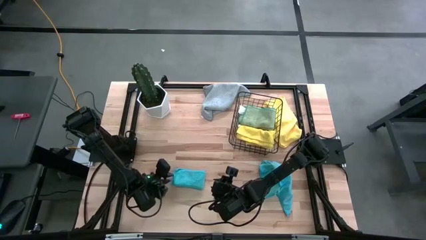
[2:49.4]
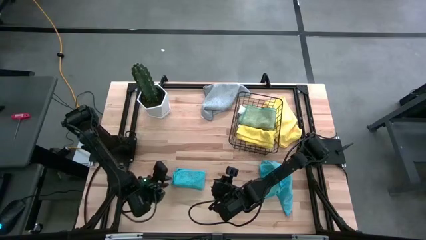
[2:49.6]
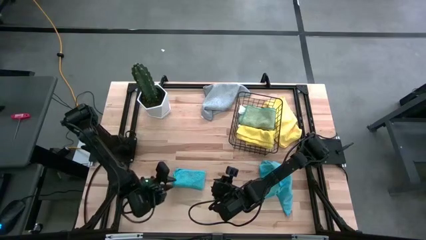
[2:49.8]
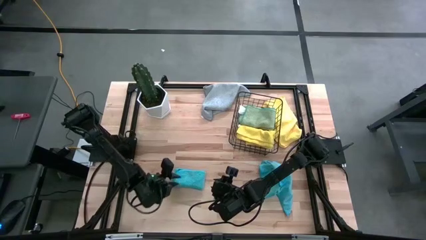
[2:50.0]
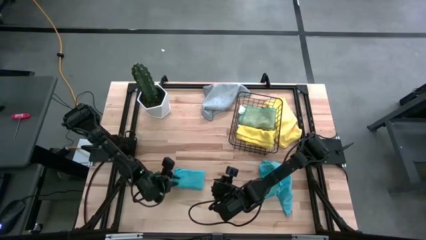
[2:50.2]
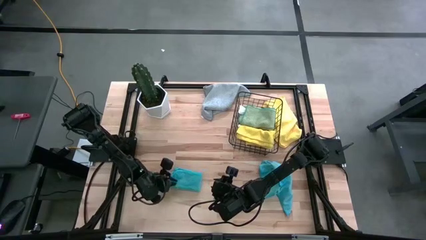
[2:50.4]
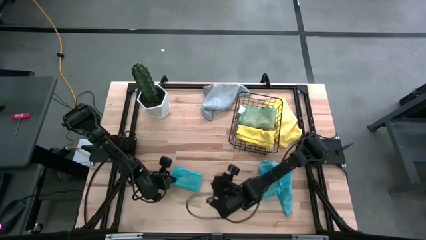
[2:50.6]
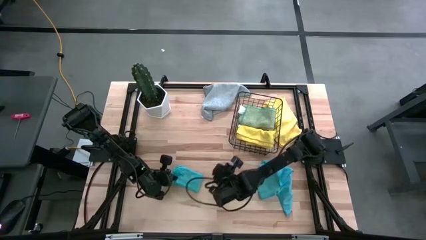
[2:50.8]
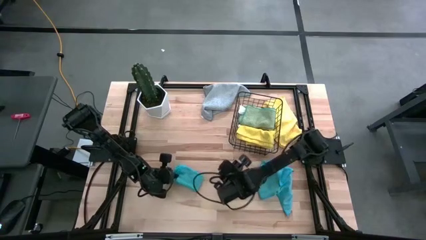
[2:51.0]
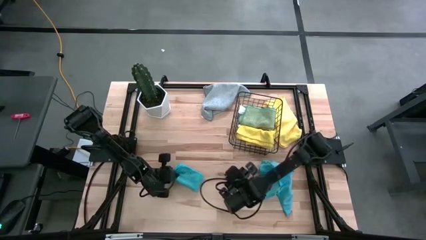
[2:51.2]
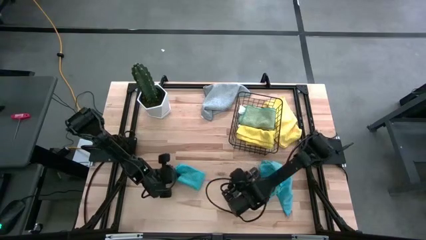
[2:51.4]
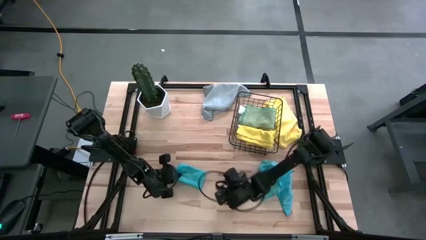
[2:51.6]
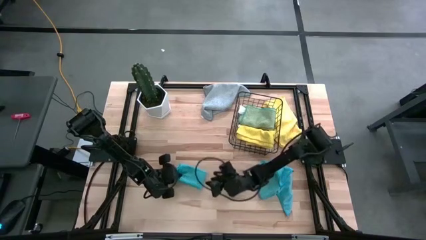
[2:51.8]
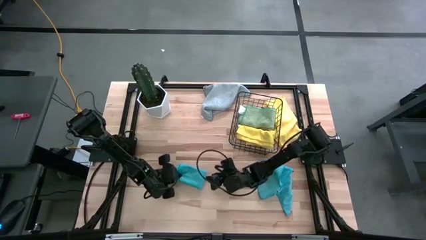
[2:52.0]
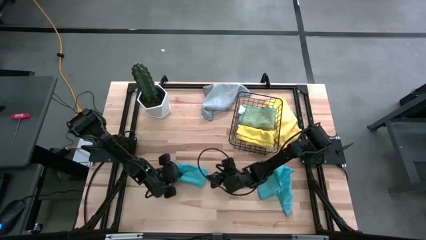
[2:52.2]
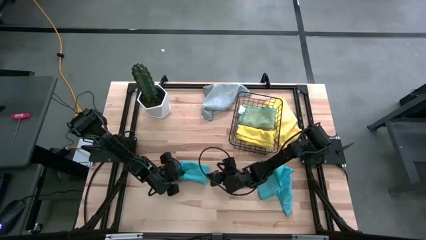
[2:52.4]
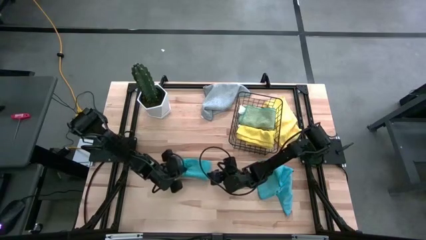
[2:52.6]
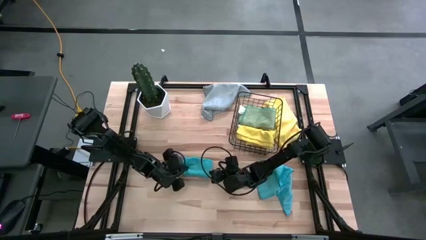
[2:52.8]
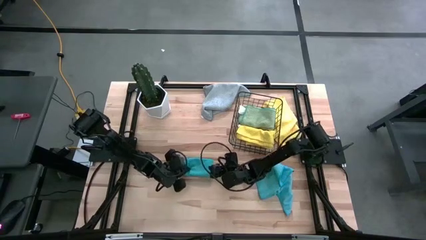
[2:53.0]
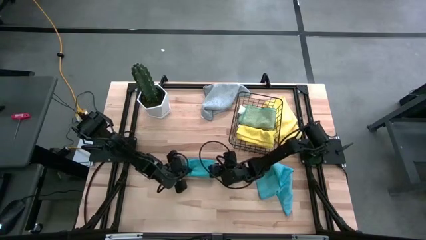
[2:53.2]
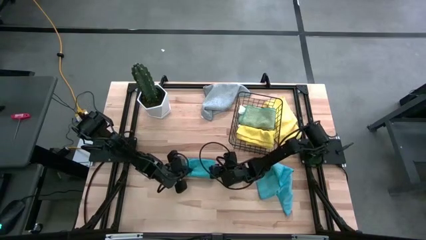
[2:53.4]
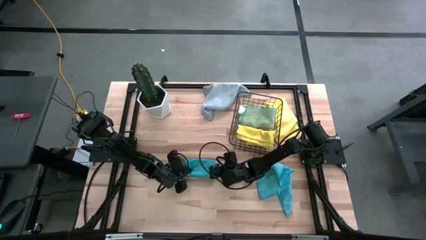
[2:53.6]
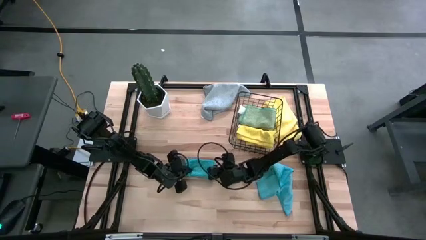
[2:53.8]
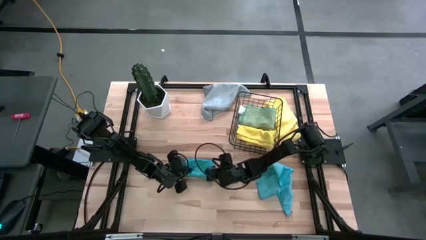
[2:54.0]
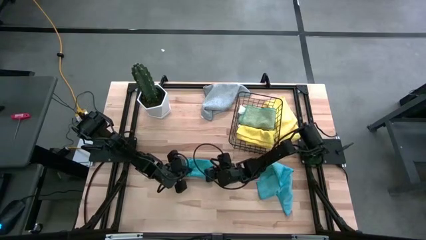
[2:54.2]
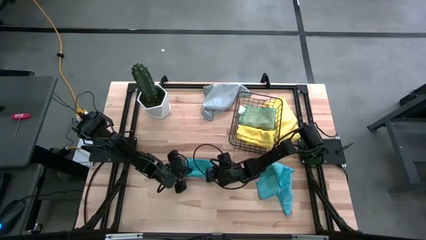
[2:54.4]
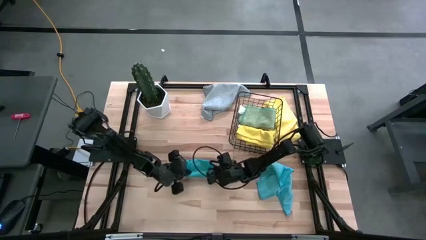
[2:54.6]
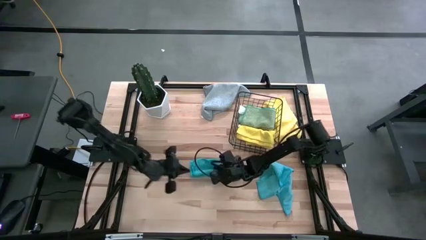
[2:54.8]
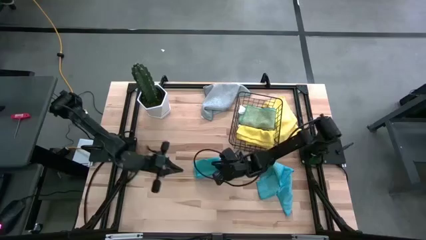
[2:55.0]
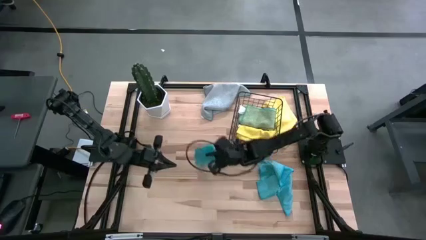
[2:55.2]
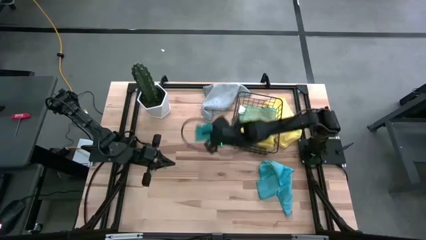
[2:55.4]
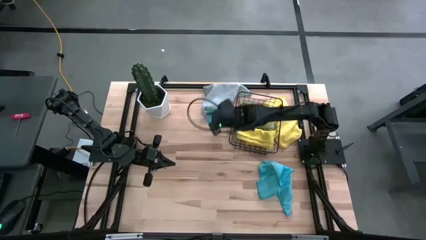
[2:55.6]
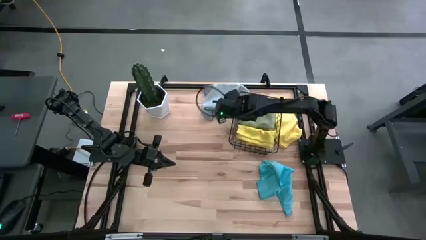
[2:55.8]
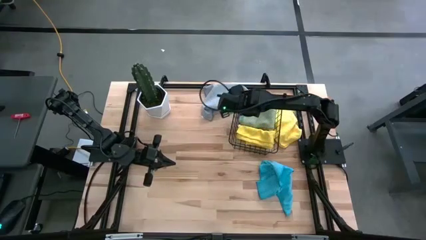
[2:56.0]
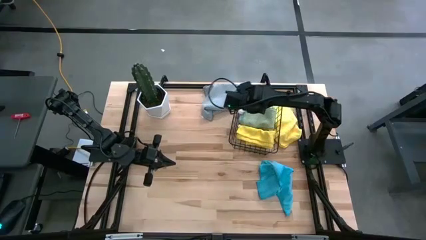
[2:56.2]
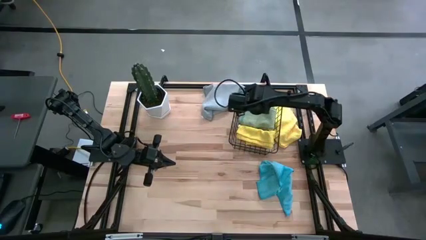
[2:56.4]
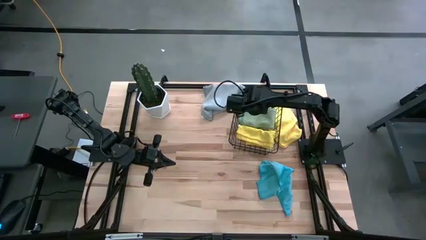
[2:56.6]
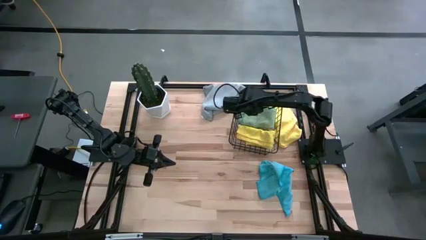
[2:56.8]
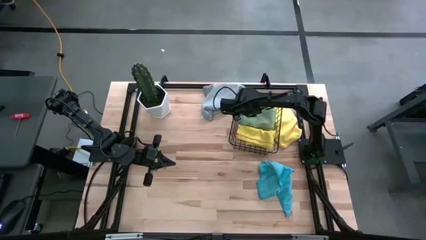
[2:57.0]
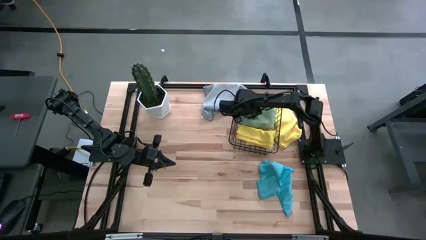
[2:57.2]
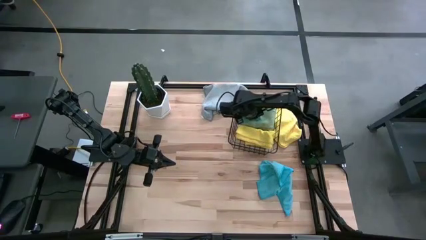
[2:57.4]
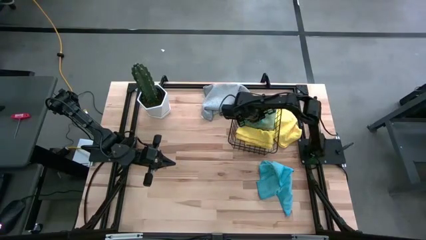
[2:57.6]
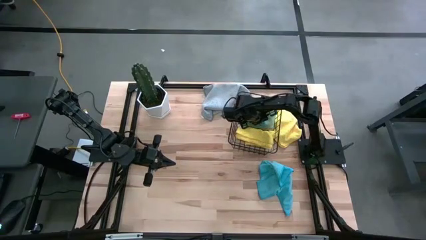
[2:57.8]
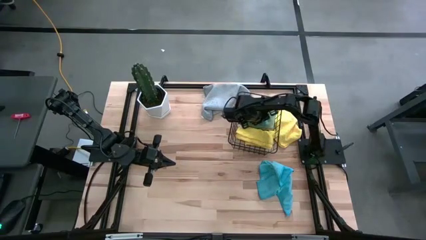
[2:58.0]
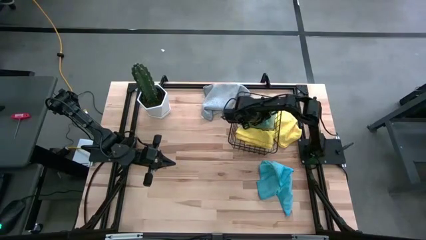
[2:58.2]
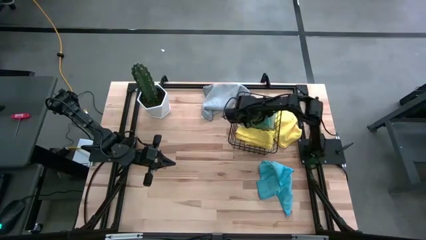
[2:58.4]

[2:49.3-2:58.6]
Task: Fold microfiber towels
Put the left folded blue microfiber towel into the black wire basket

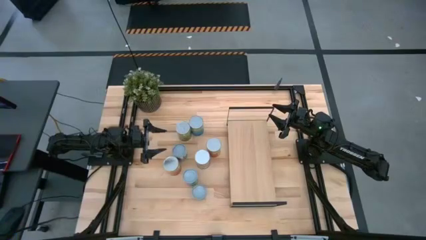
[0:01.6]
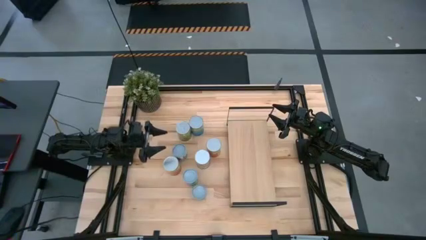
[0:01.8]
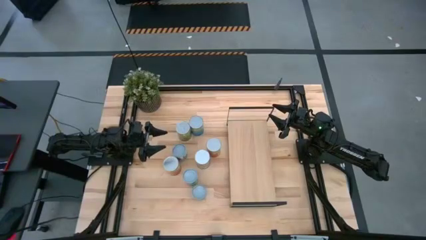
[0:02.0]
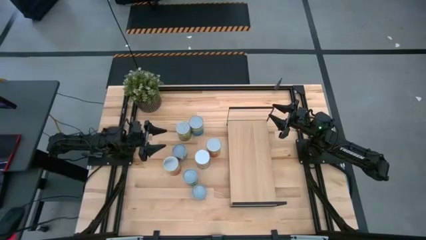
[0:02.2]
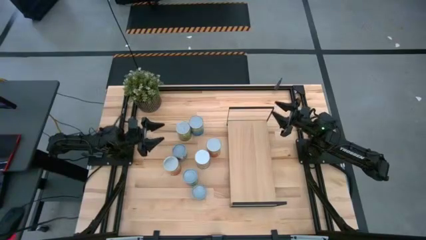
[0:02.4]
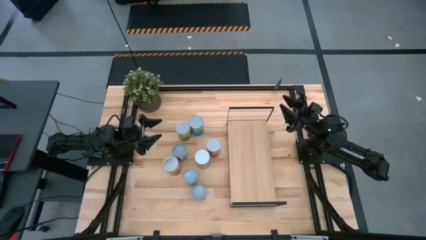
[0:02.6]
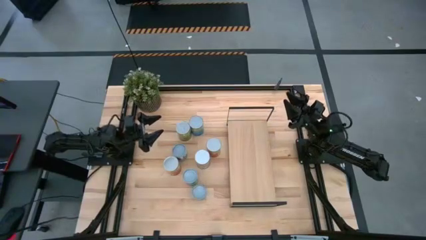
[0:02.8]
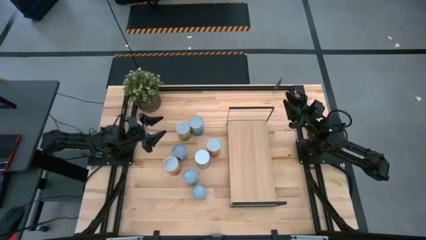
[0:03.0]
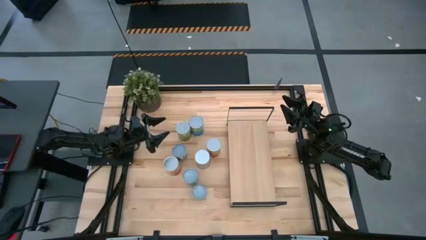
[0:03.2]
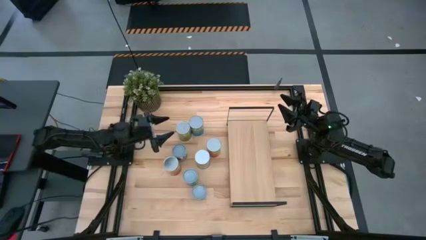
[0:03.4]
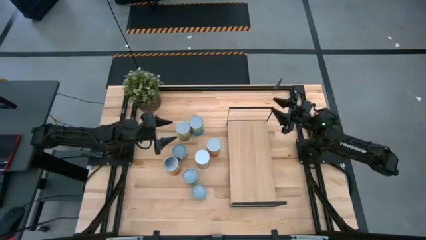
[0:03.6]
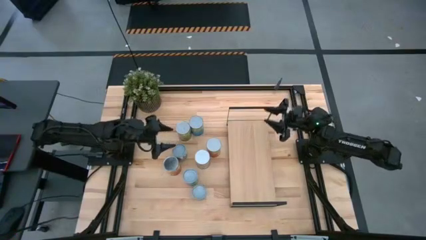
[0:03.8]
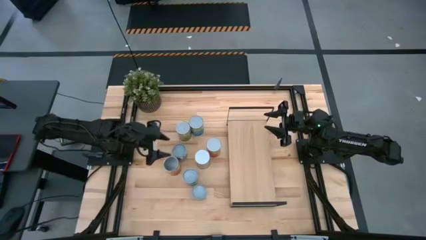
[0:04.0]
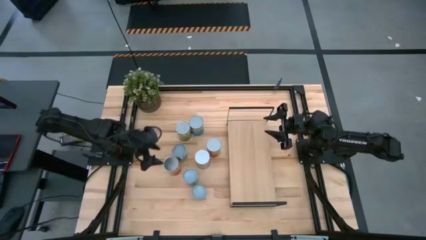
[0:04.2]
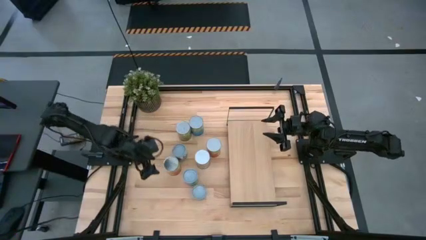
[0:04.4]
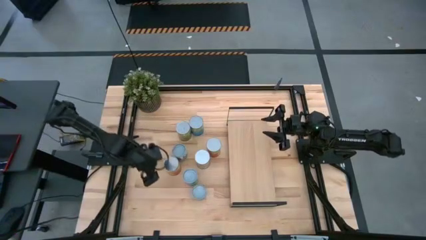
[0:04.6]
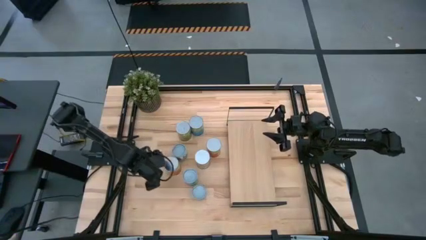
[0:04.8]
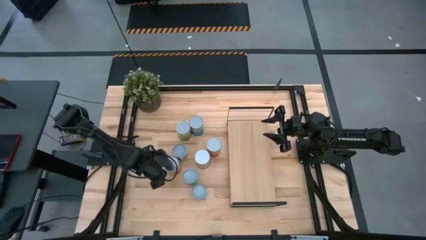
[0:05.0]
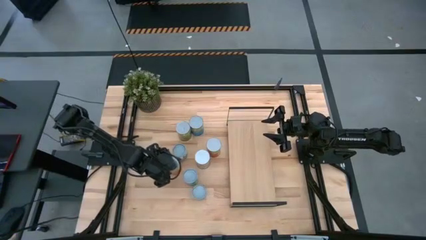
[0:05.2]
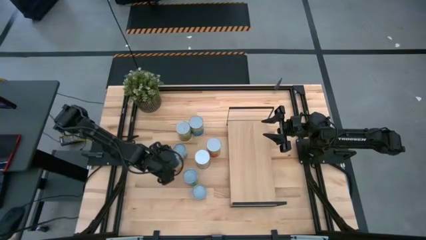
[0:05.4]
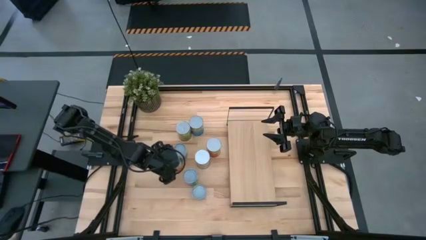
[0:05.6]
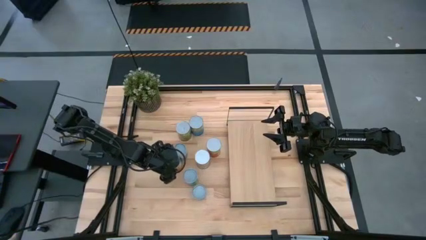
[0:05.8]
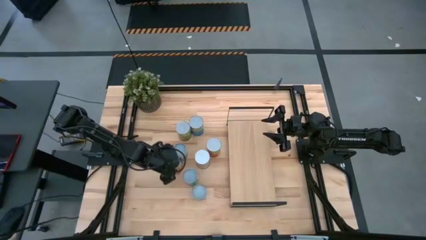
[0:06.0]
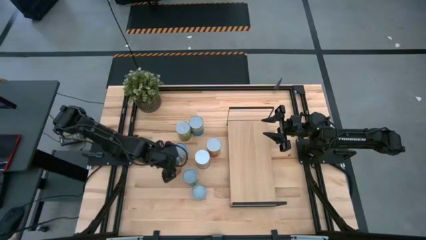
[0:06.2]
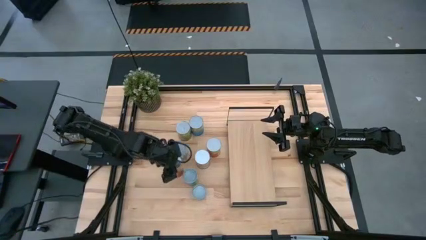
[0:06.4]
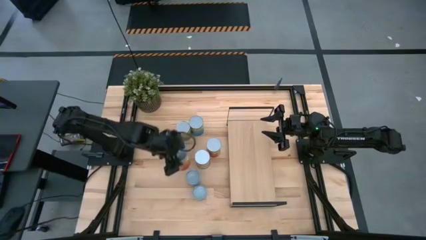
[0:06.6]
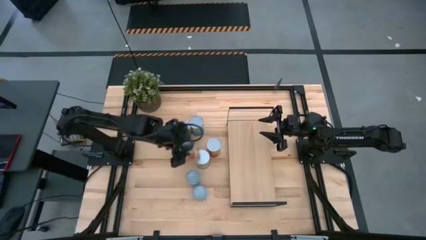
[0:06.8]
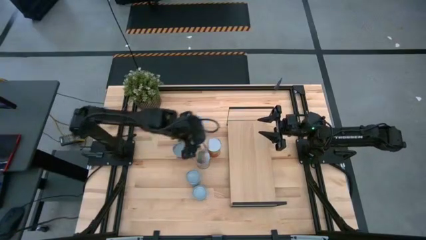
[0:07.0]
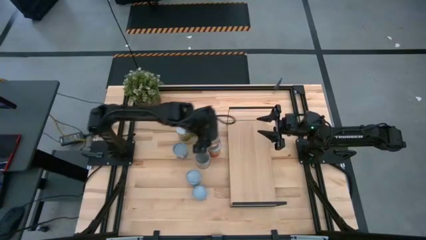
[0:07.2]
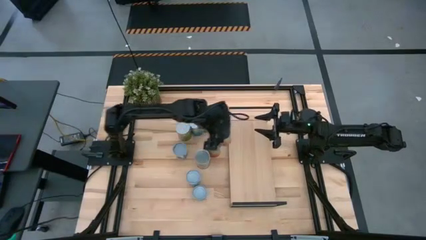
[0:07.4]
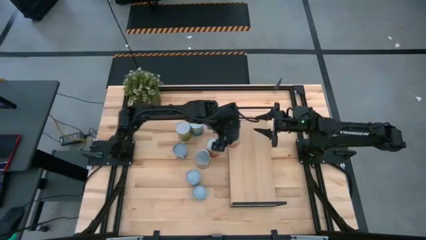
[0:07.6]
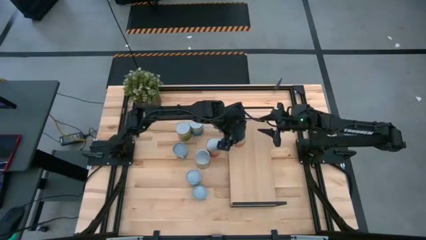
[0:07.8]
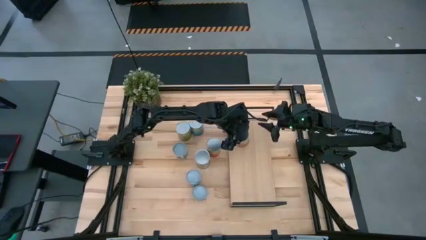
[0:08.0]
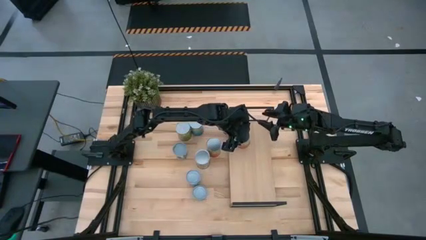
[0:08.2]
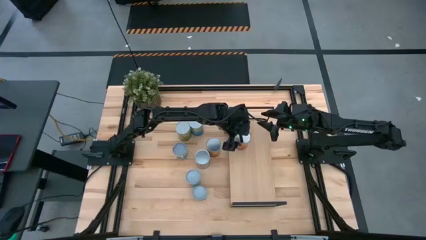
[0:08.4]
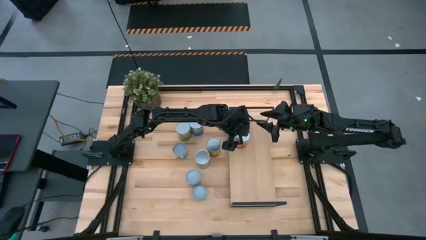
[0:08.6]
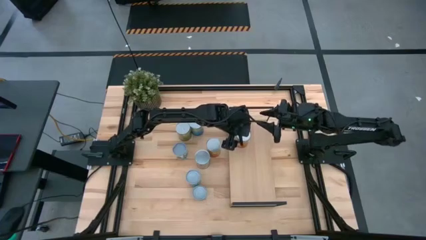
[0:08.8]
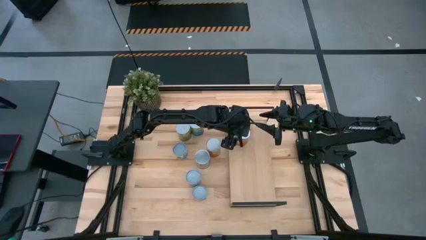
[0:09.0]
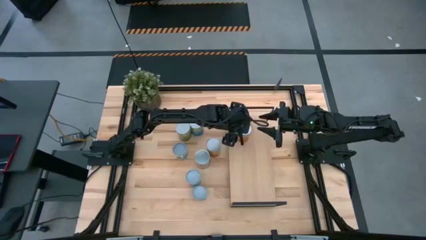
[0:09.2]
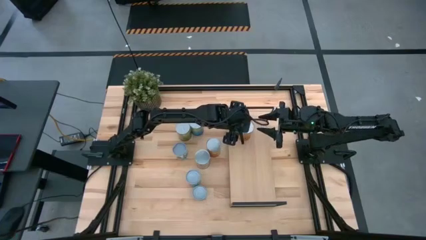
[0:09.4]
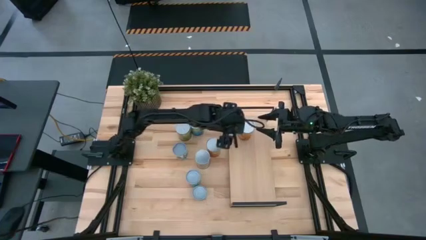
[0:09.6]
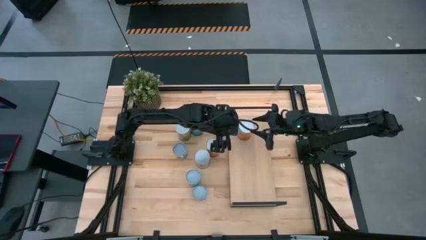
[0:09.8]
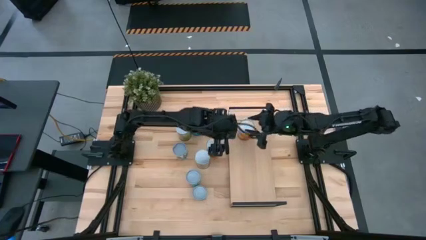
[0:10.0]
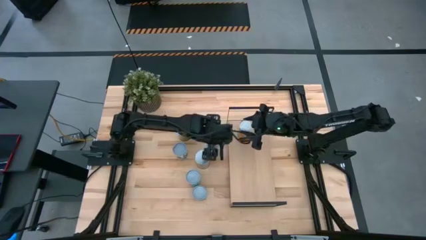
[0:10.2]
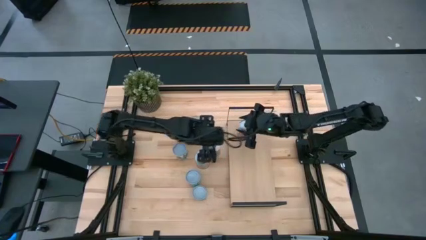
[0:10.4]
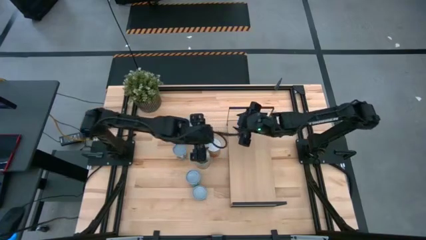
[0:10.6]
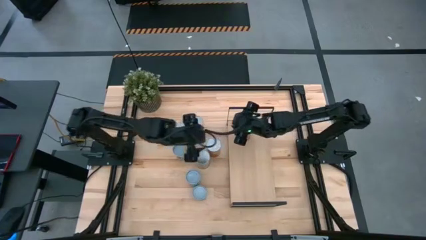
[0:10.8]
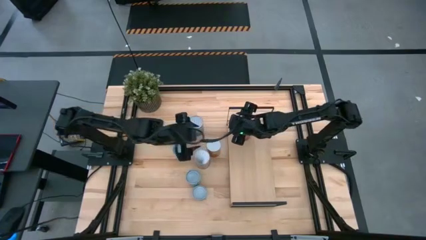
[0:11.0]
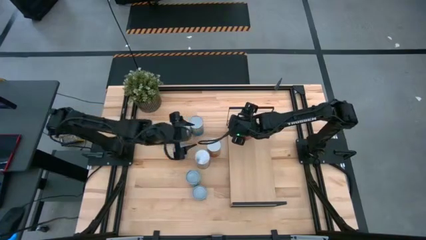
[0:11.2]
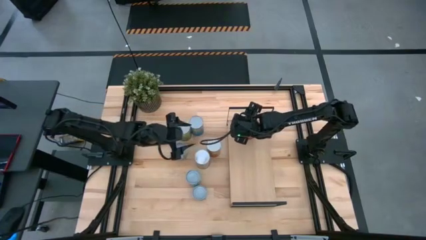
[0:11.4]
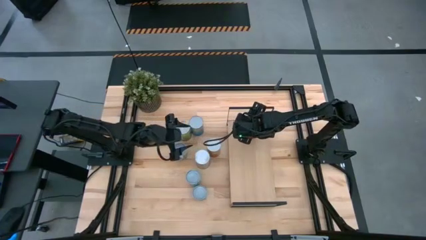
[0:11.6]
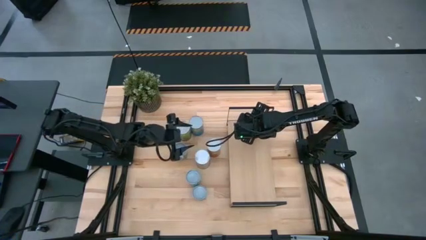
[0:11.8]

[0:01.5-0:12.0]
Task: Pick and place cans onto a shelf
Put the canned corn on the shelf
